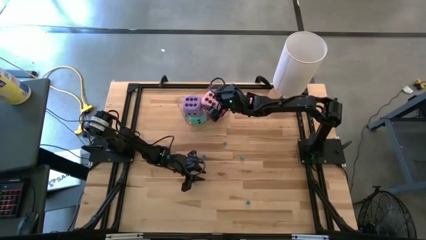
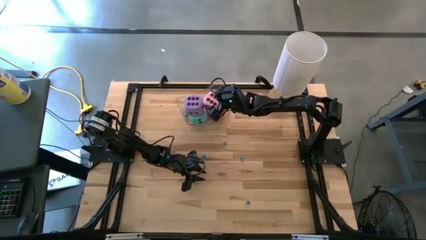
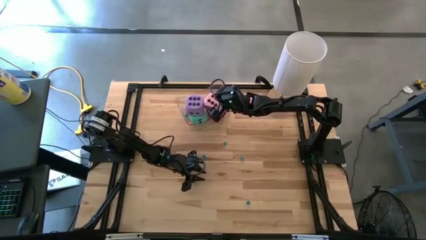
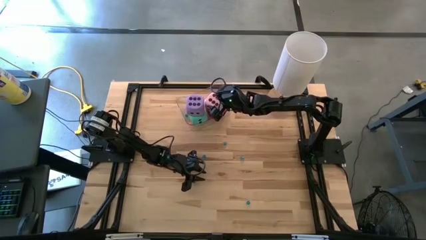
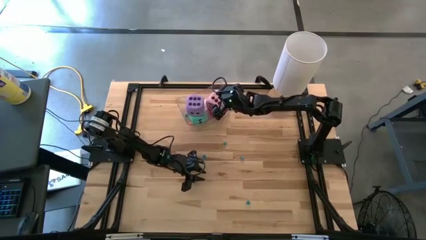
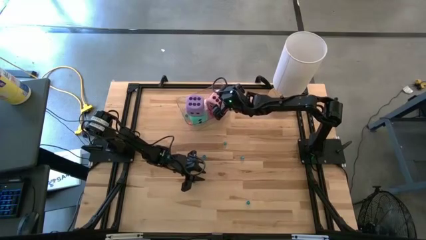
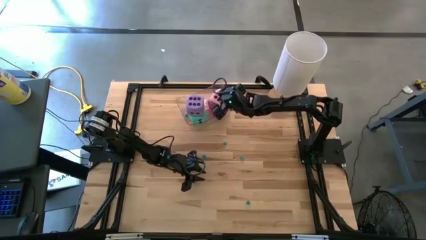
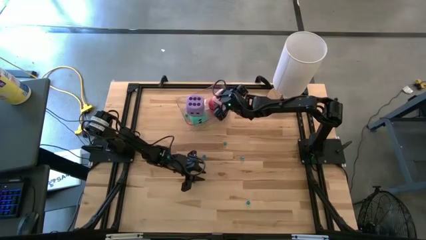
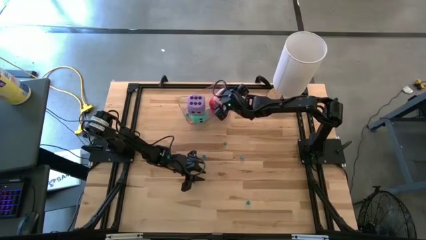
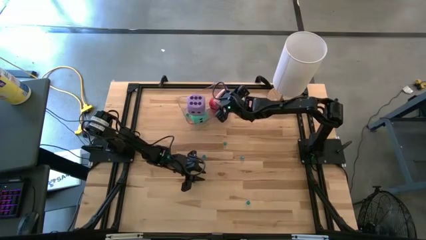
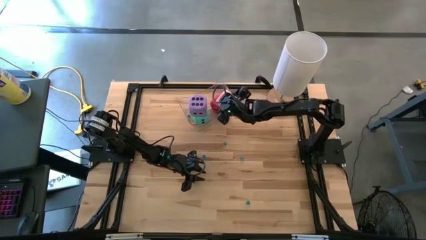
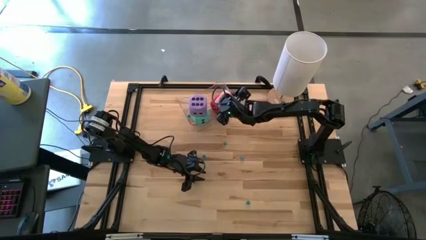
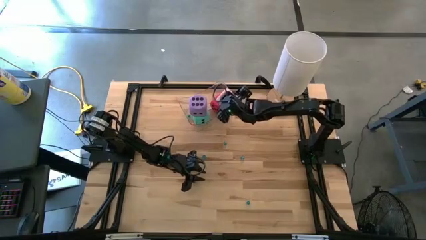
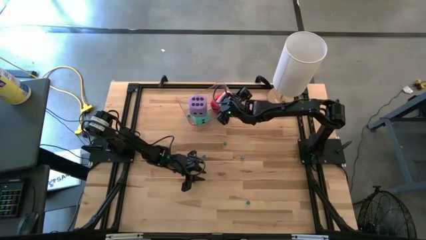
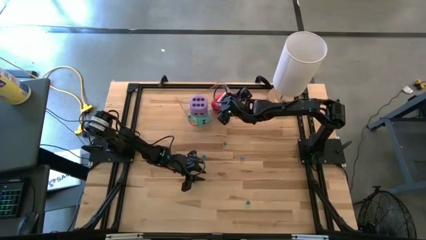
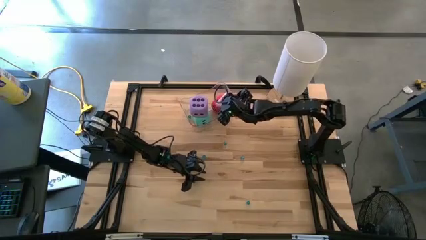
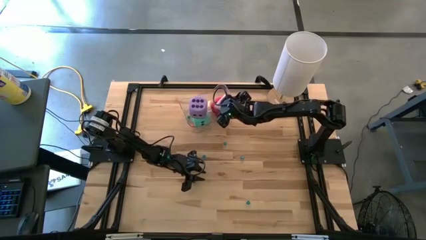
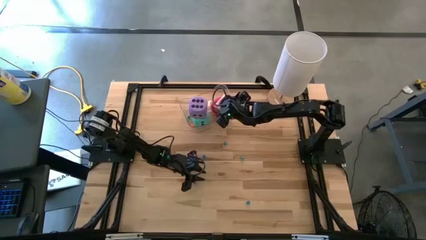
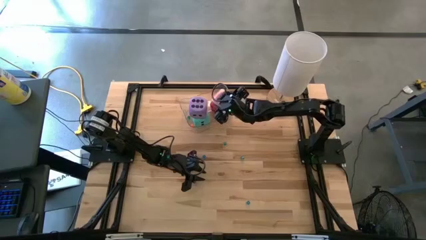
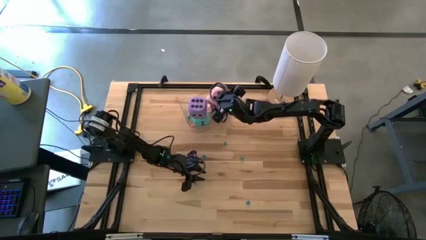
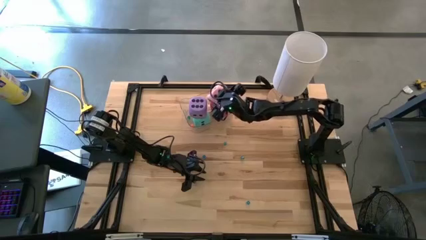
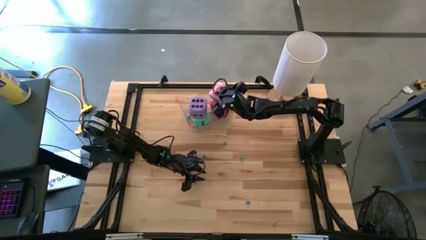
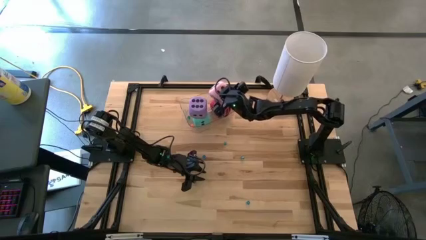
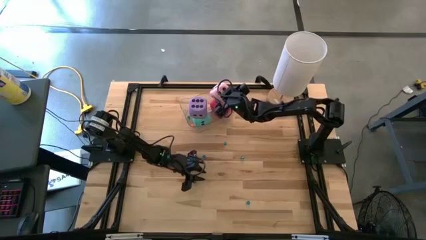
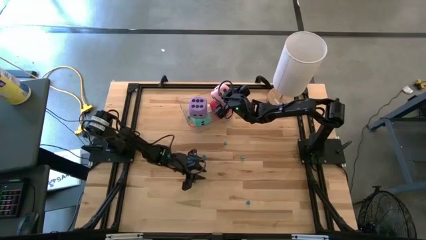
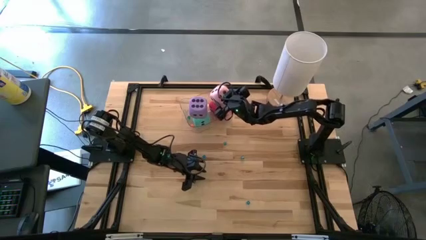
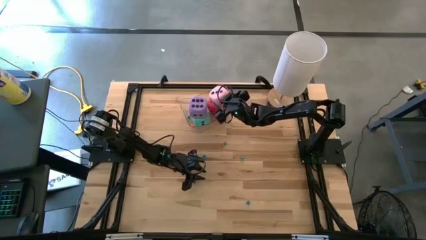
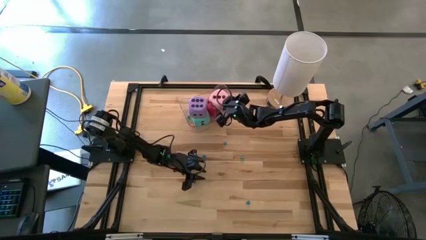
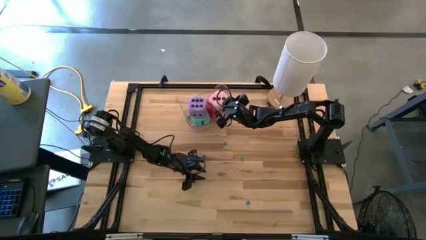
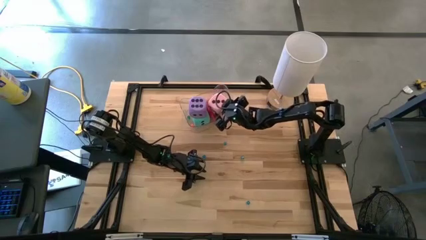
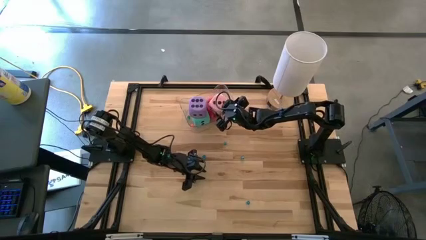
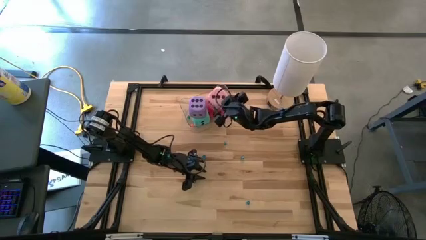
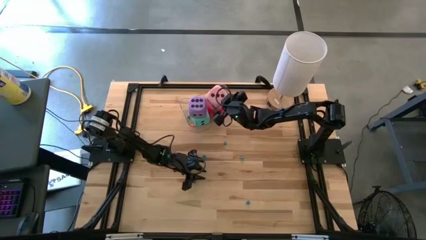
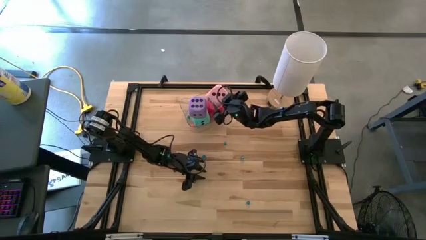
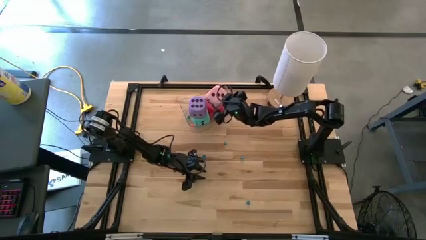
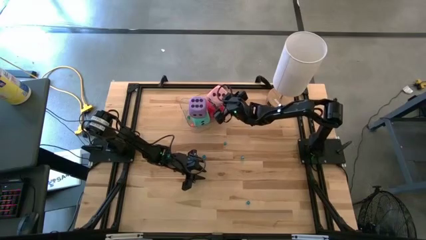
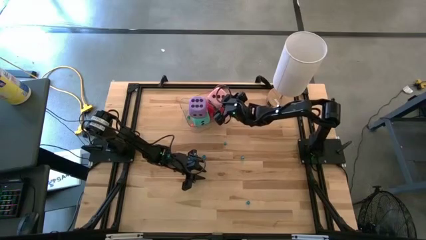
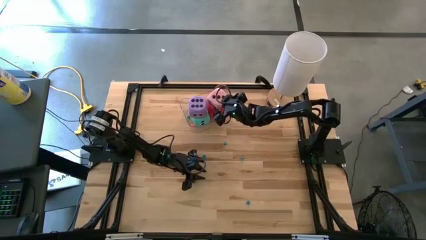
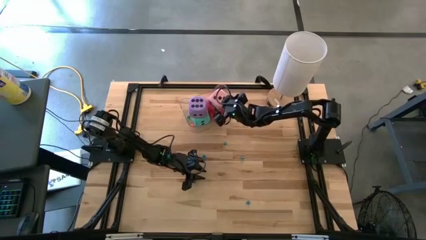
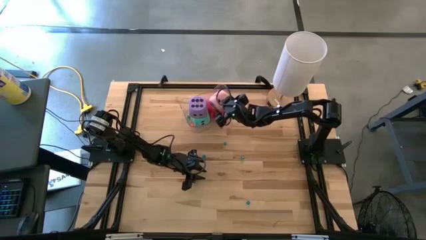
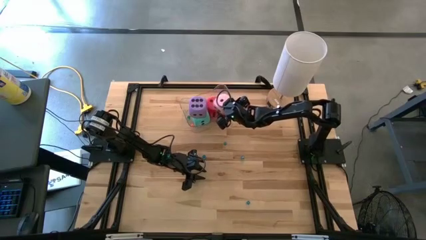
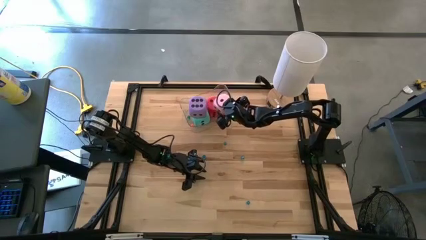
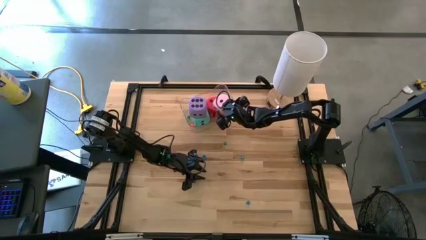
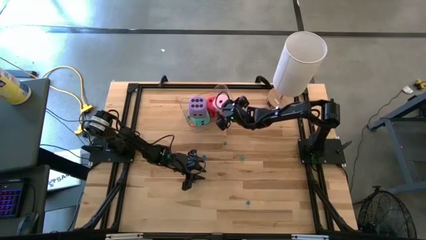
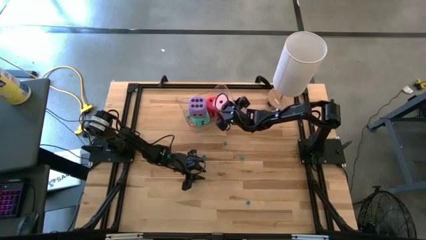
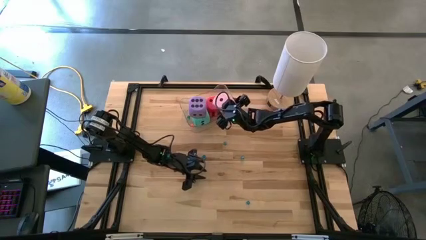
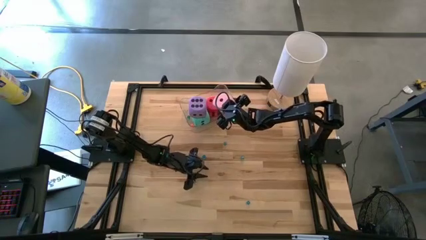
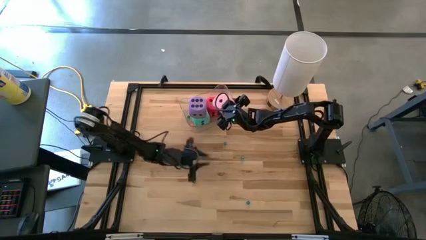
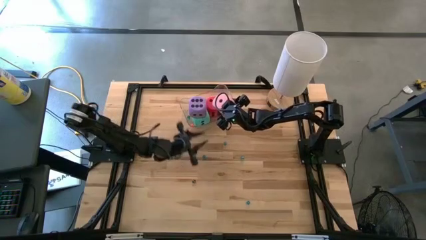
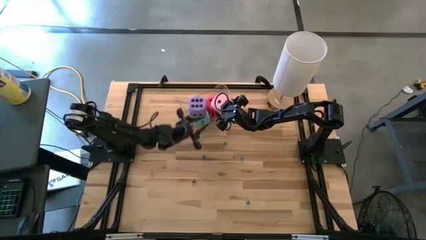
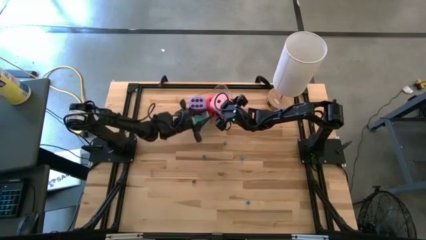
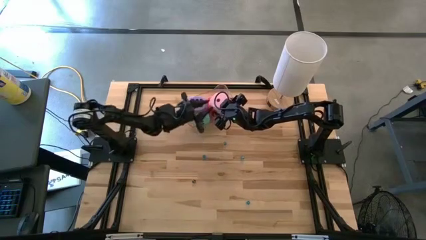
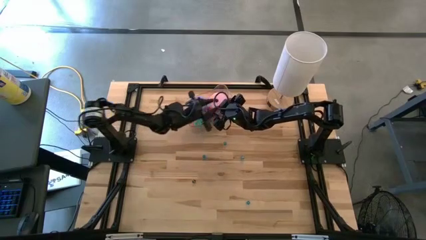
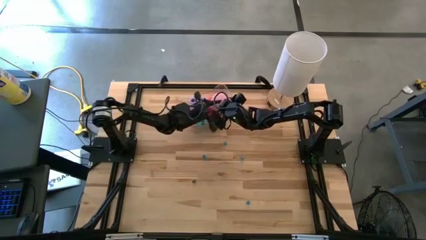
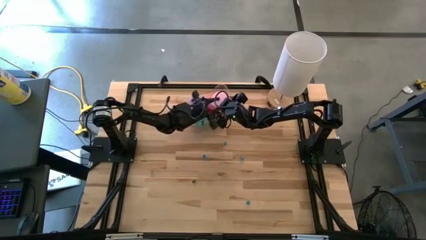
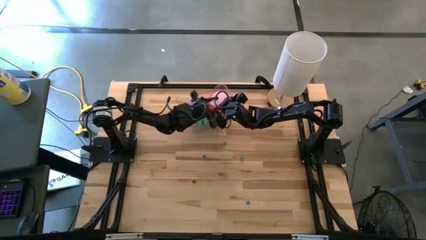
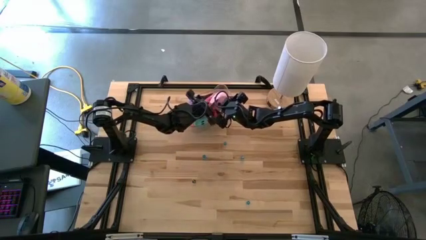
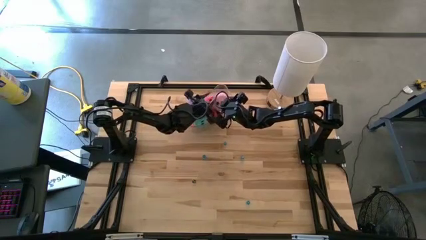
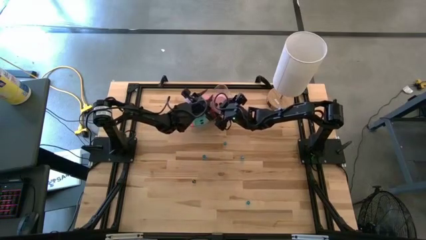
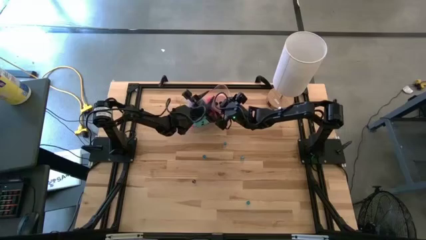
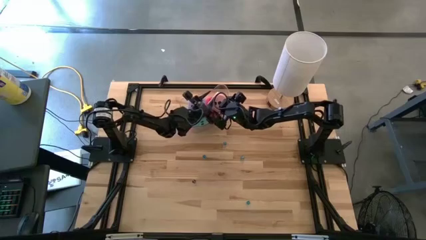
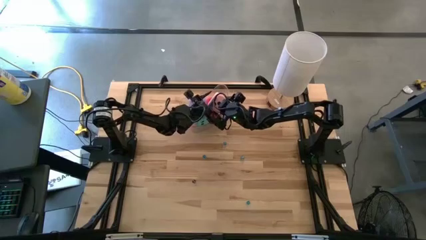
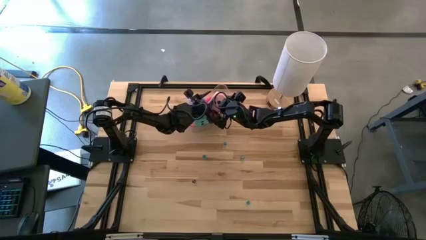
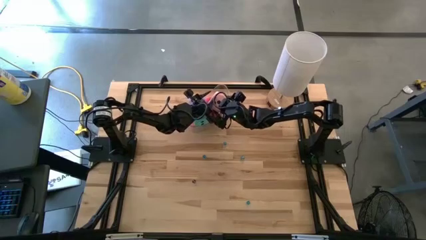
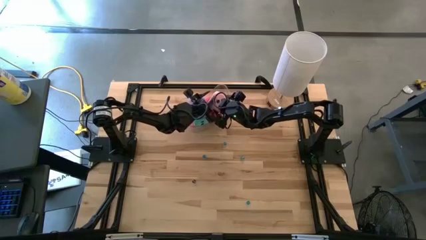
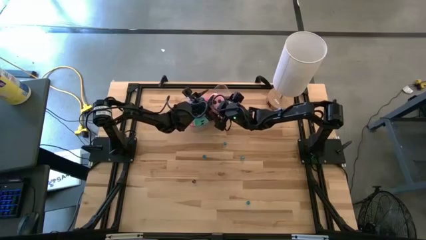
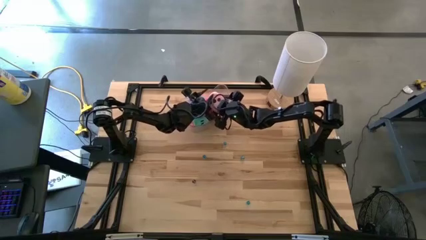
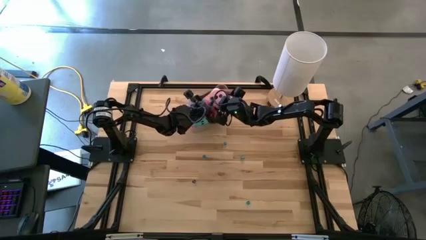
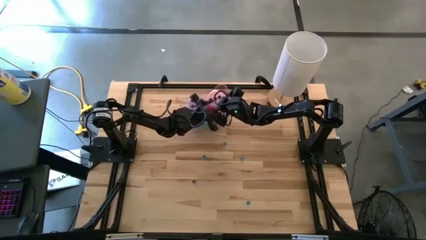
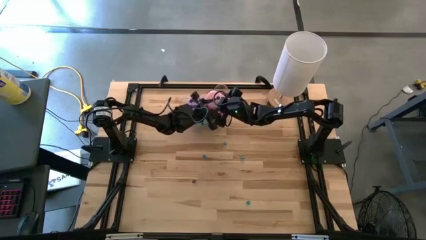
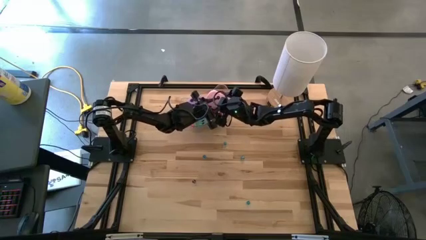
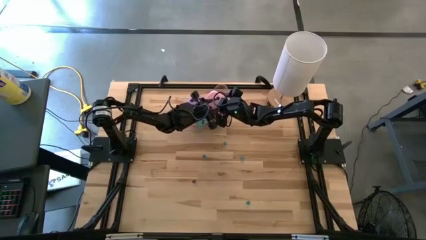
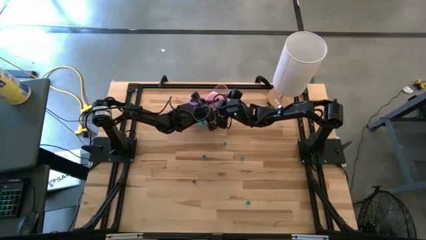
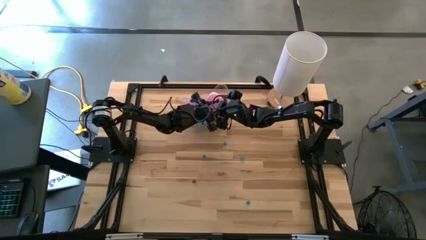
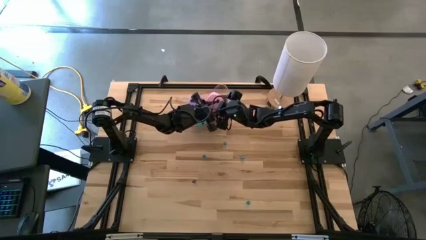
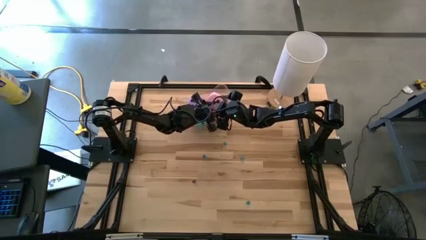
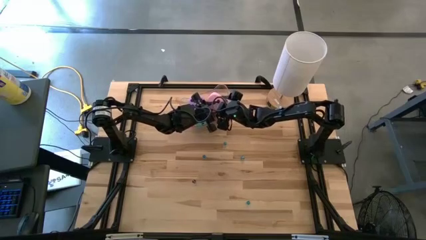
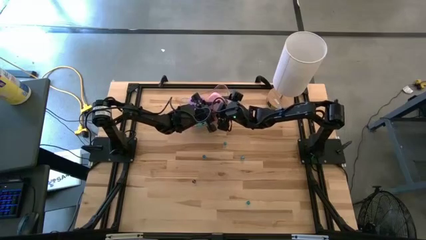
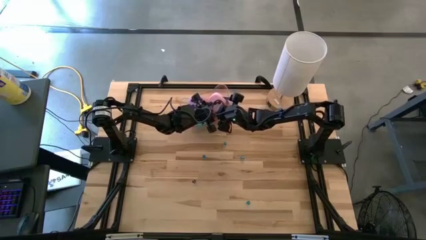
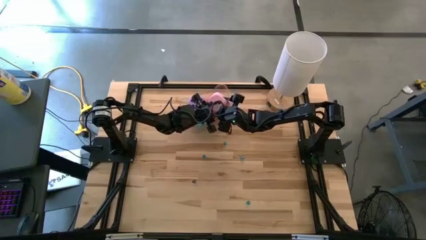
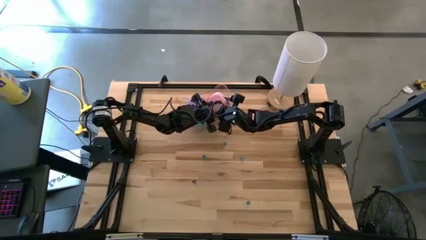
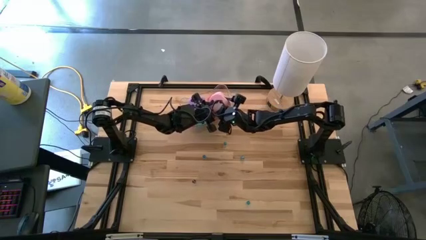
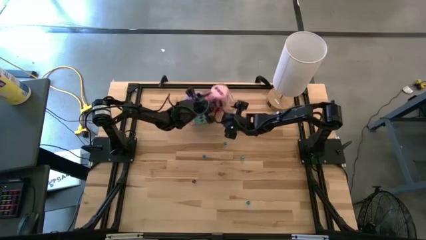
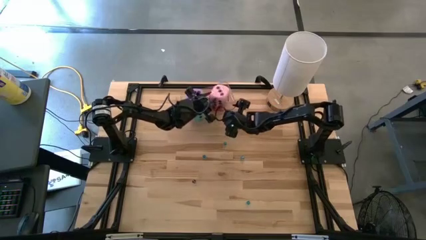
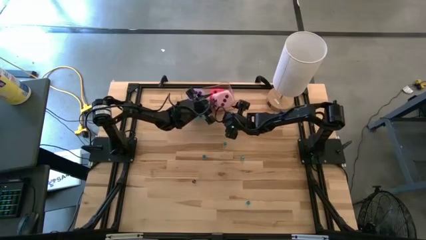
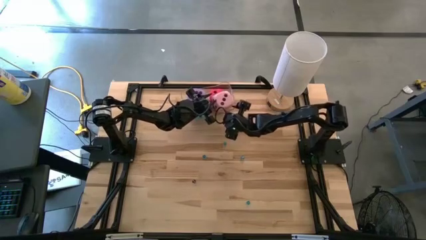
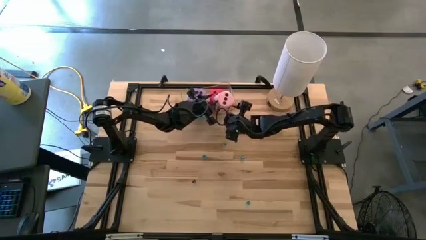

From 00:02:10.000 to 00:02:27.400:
Task: Pick & Place Dice
Put the large pink dice in the transparent bin
